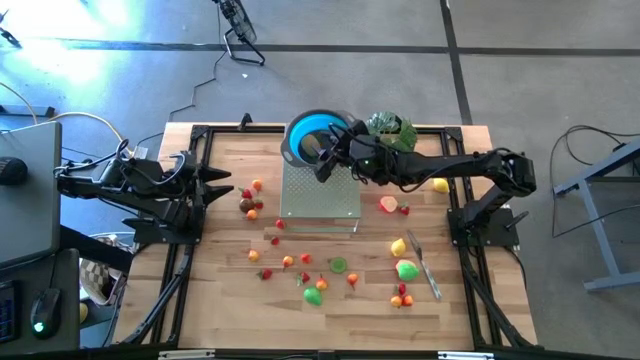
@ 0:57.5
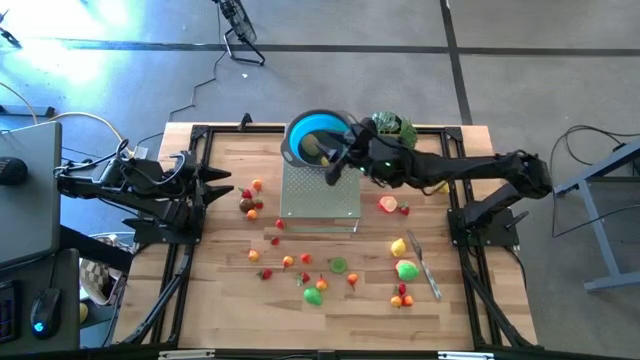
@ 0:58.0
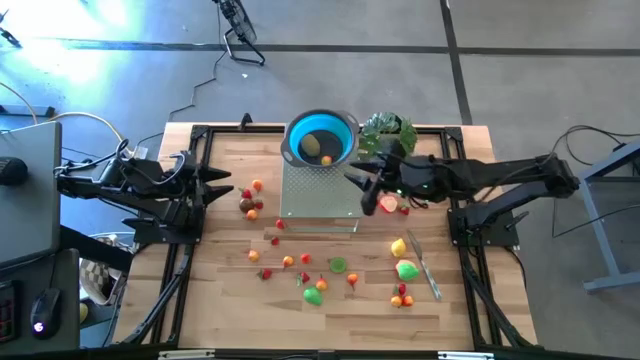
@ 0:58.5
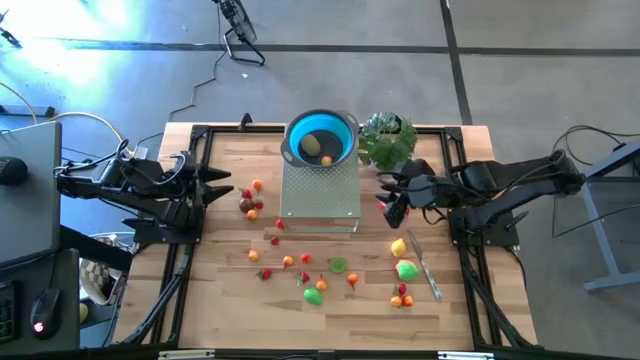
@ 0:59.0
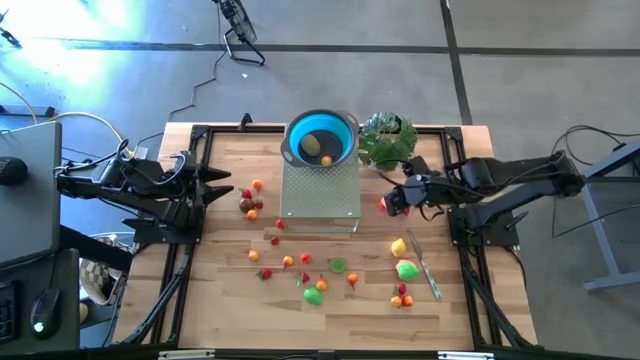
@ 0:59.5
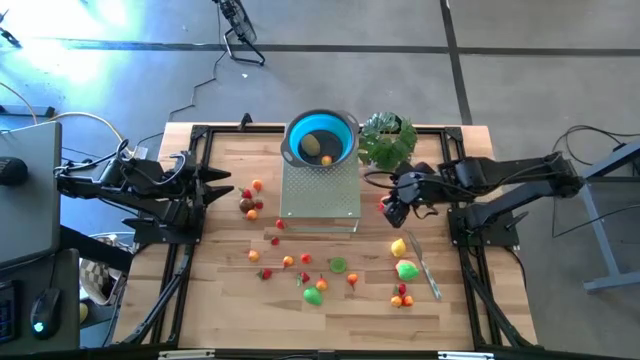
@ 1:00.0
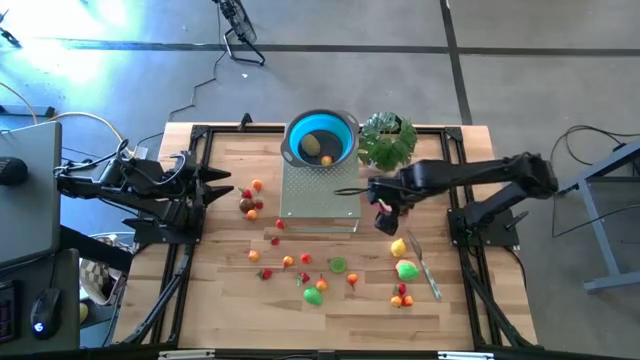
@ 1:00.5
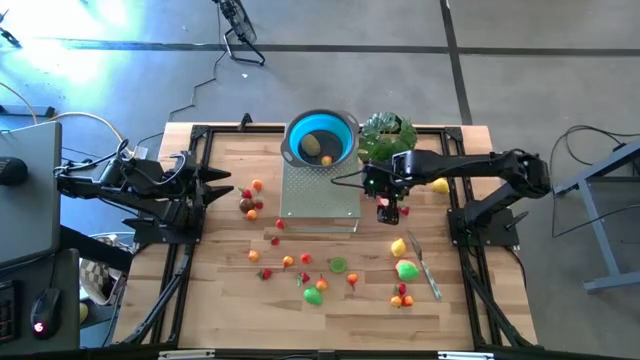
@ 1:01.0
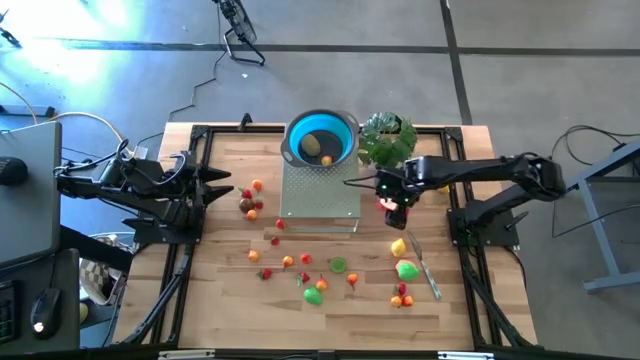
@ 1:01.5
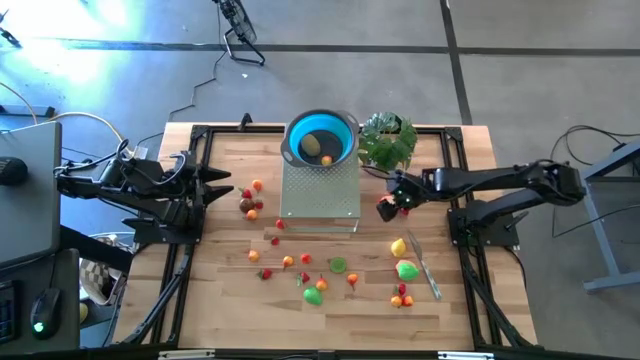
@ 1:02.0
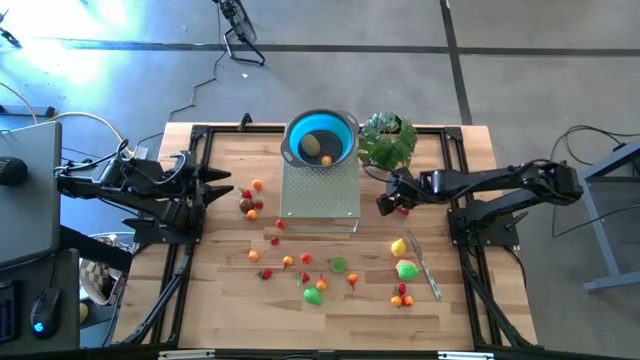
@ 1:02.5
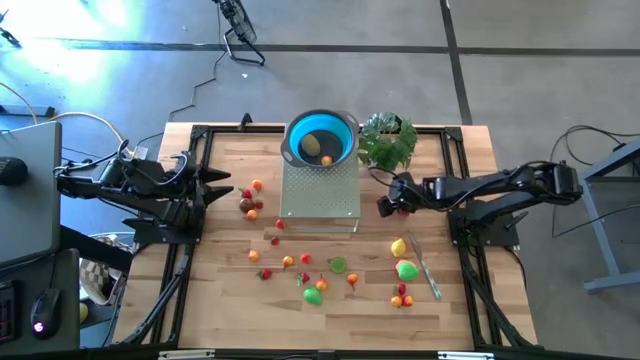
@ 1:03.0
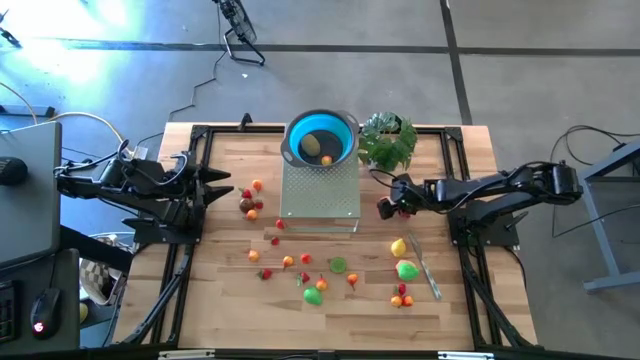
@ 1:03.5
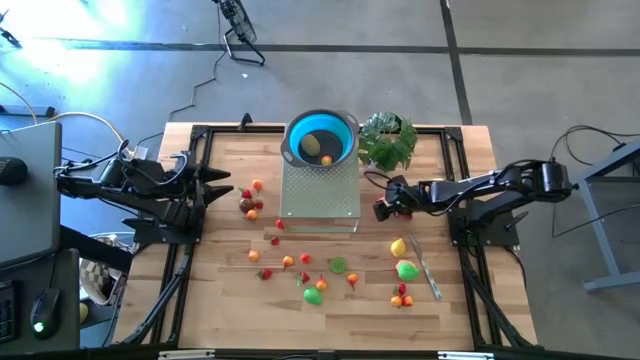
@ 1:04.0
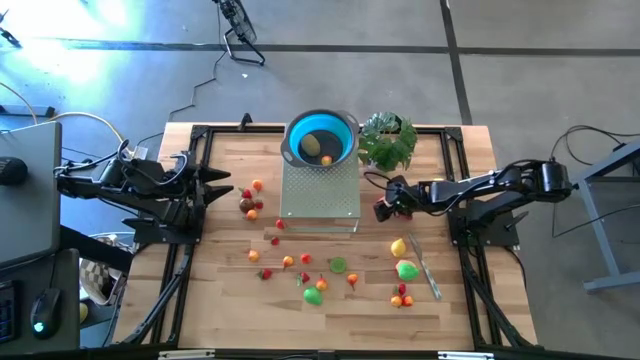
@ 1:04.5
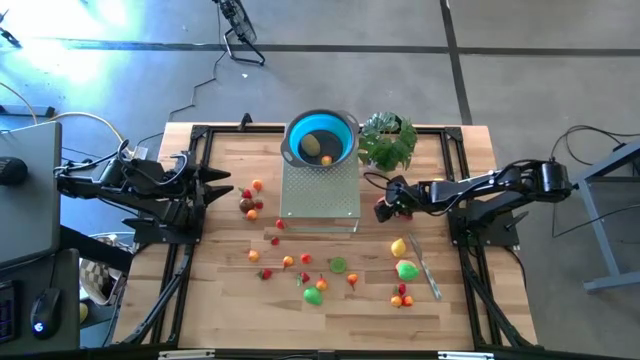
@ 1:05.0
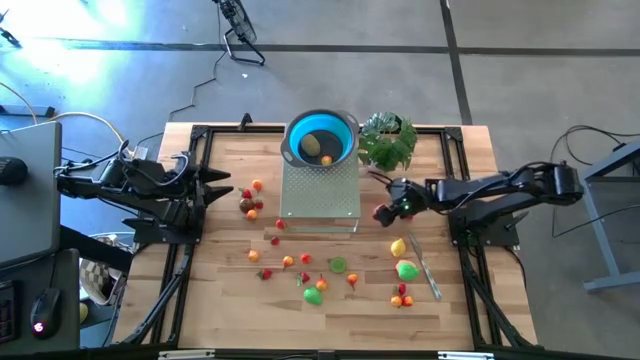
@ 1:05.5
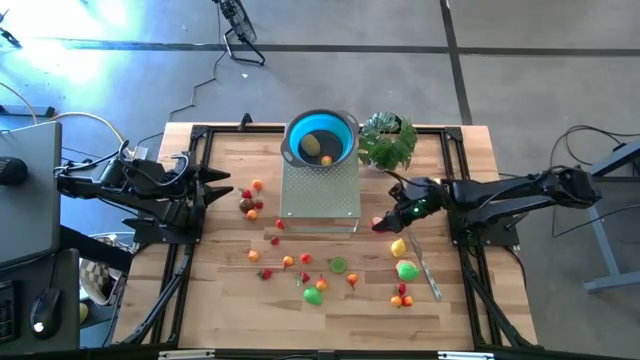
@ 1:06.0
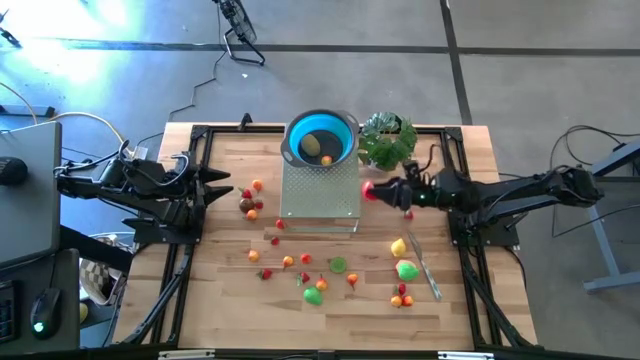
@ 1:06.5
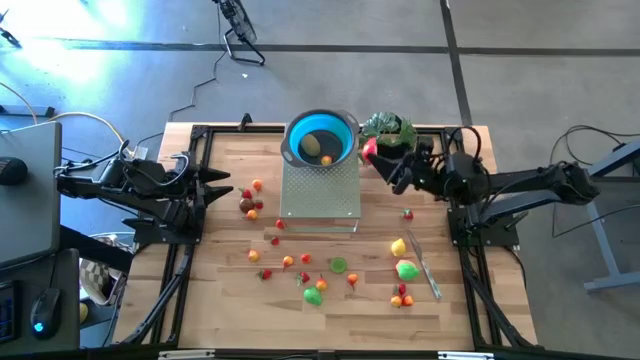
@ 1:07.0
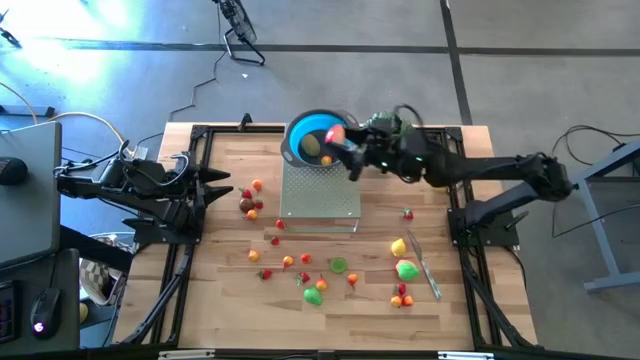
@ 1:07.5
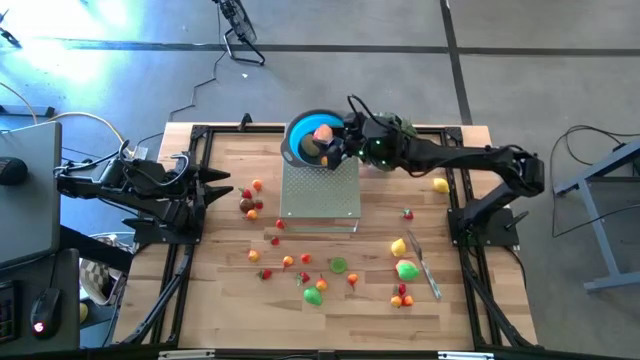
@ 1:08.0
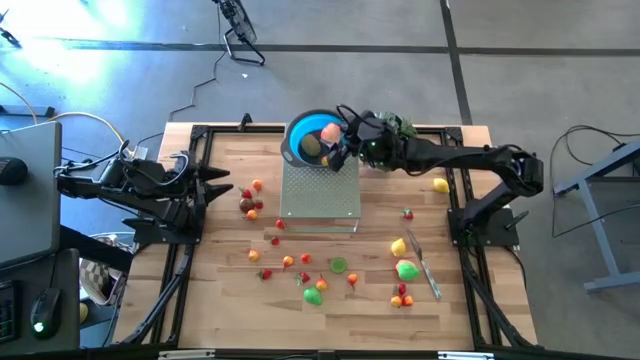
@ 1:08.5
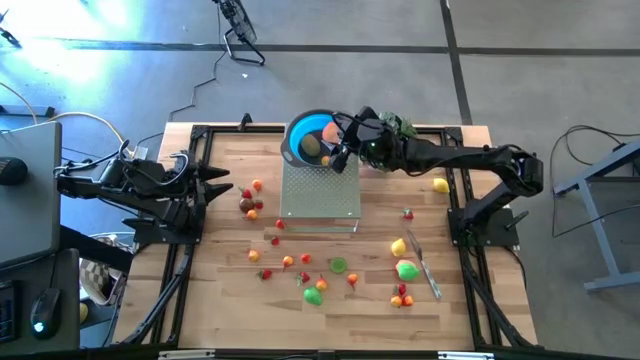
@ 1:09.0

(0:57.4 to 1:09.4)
Task: Pick & Place Fruit
Put the red apple in the blue bowl on the shelf

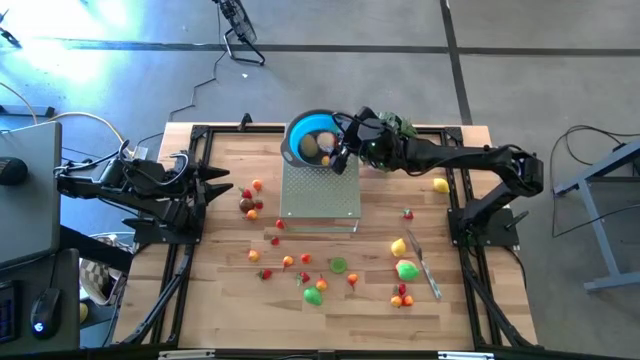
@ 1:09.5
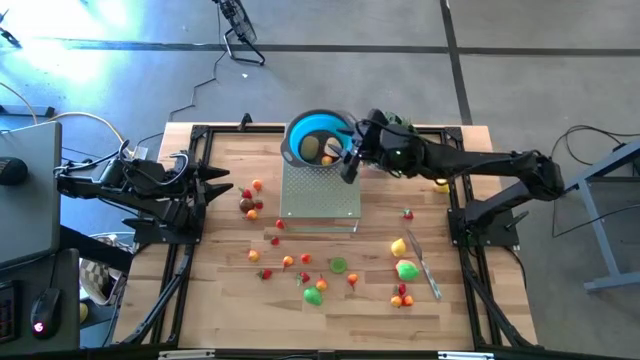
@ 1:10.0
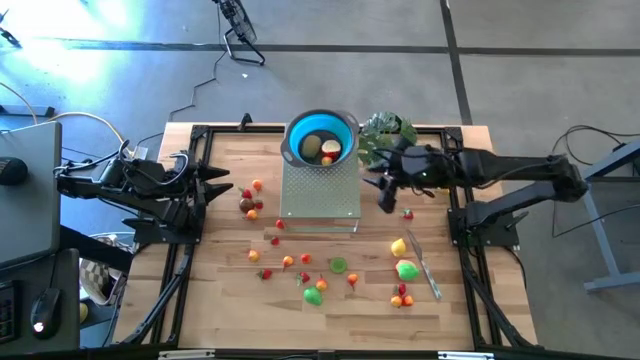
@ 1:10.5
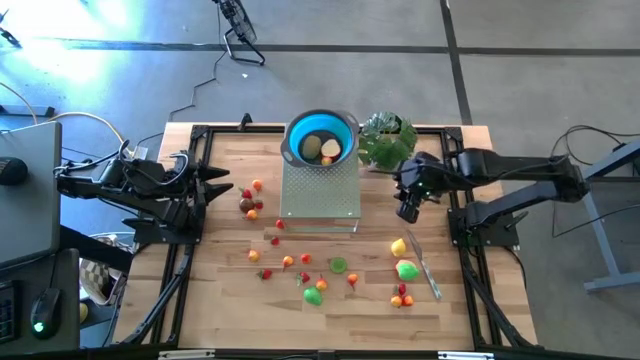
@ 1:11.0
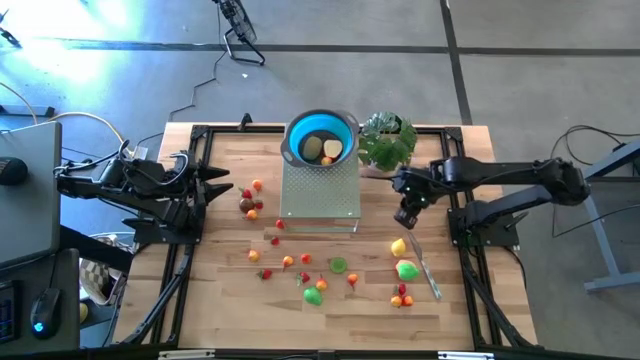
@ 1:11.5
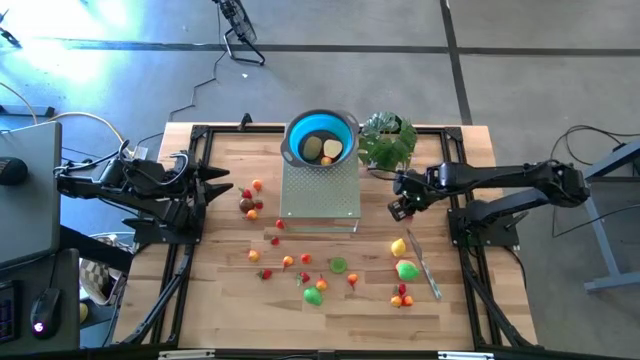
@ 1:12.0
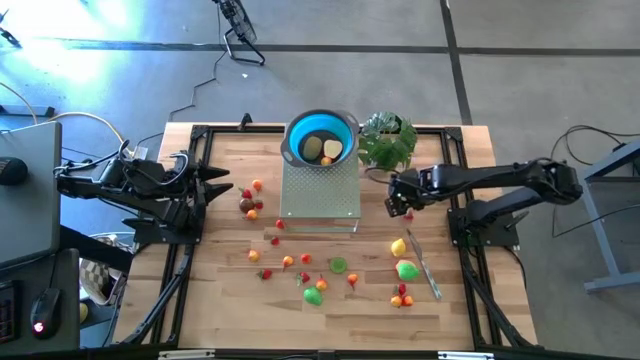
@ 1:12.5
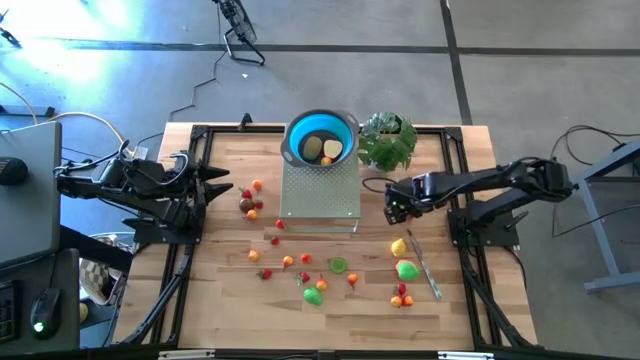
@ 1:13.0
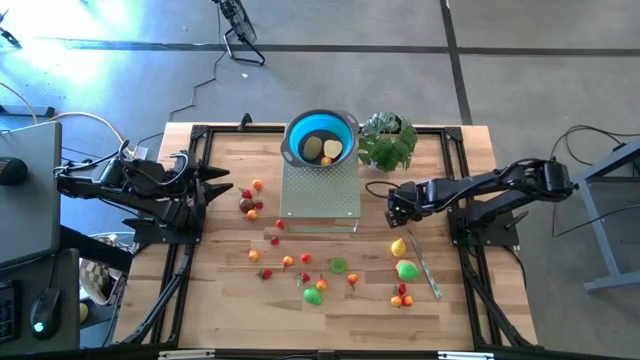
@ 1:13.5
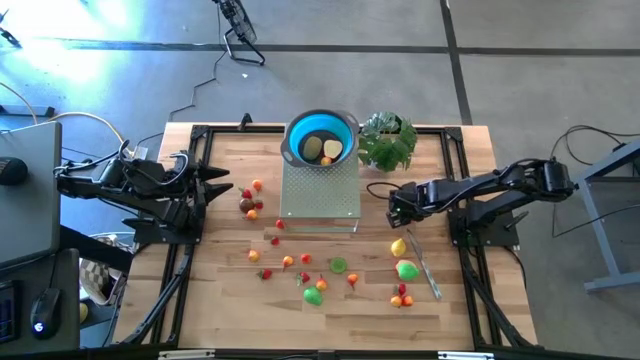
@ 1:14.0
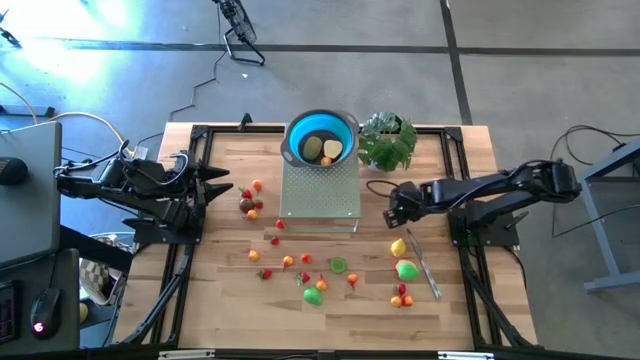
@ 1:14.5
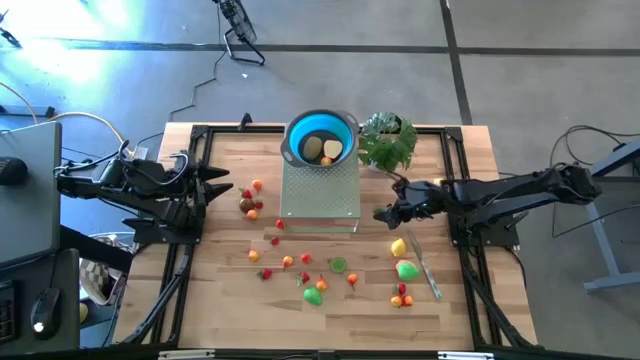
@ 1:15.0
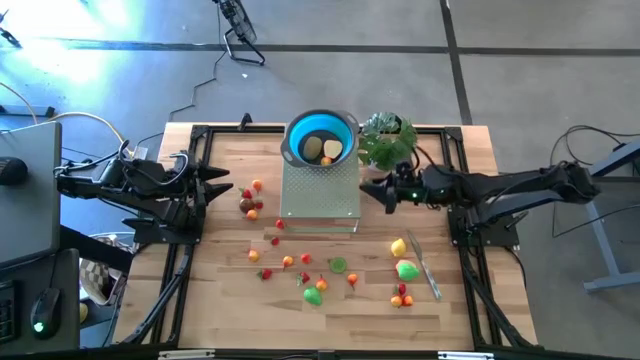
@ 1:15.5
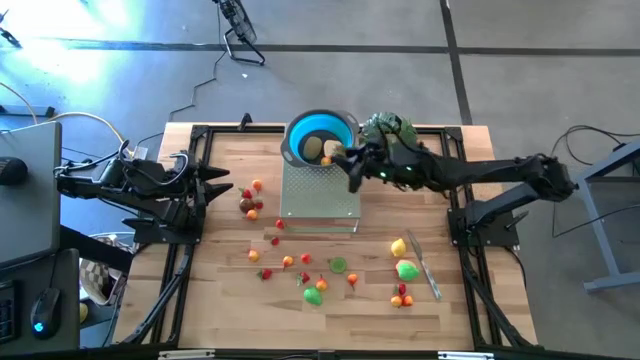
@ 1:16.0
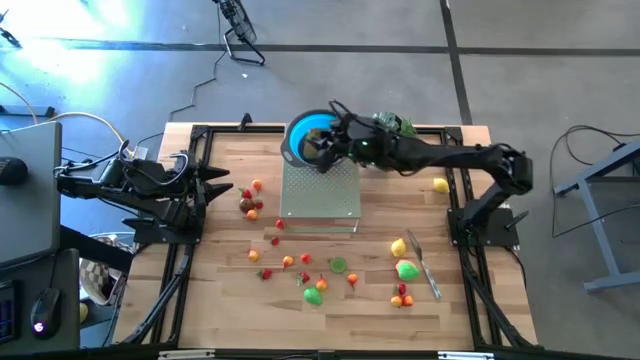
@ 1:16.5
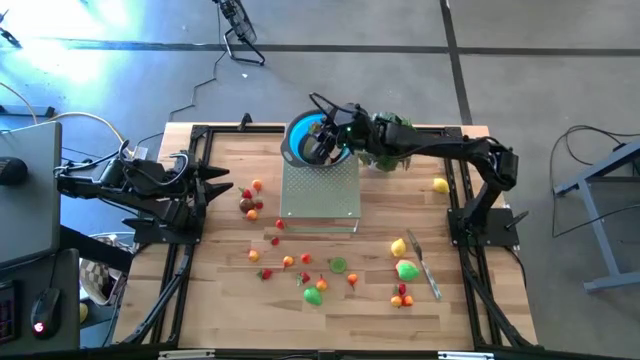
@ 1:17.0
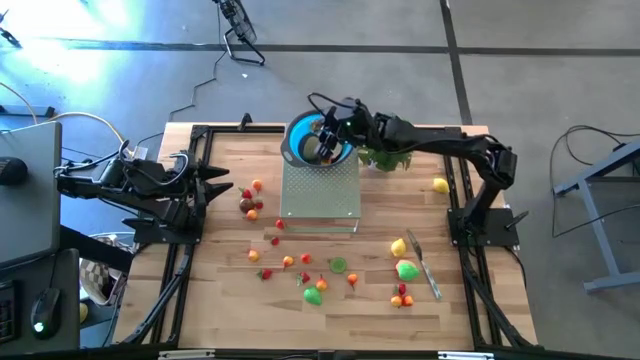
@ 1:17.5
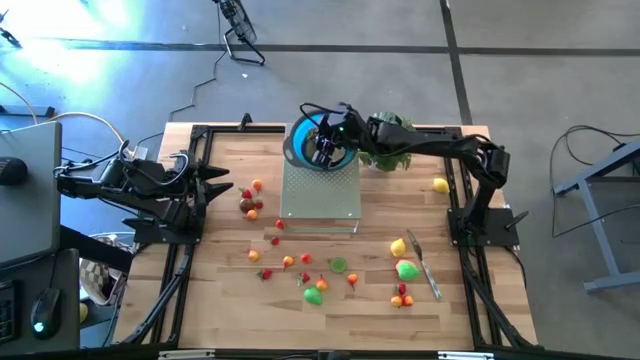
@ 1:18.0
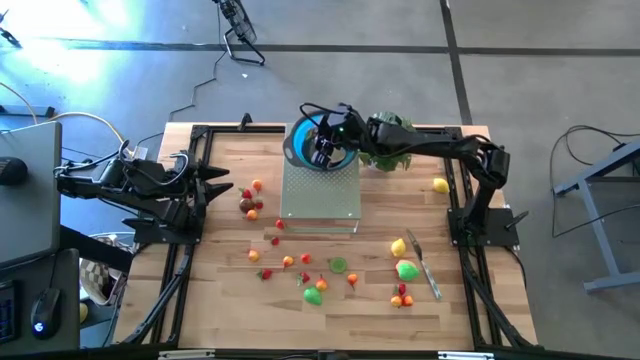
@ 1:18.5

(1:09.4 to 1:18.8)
Put the red strawberry in the blue bowl on the shelf
